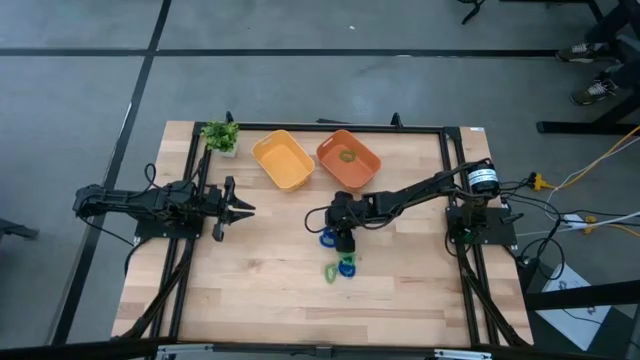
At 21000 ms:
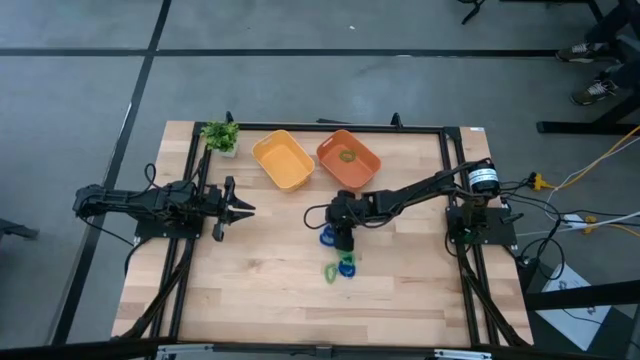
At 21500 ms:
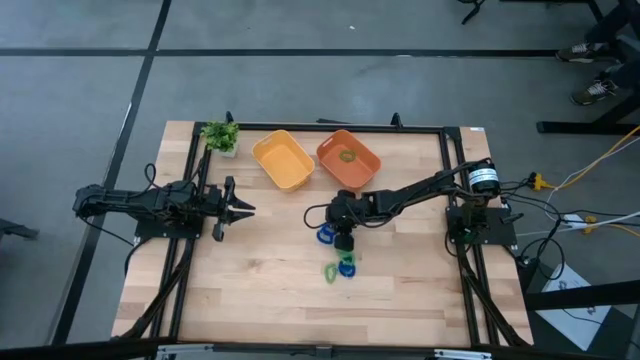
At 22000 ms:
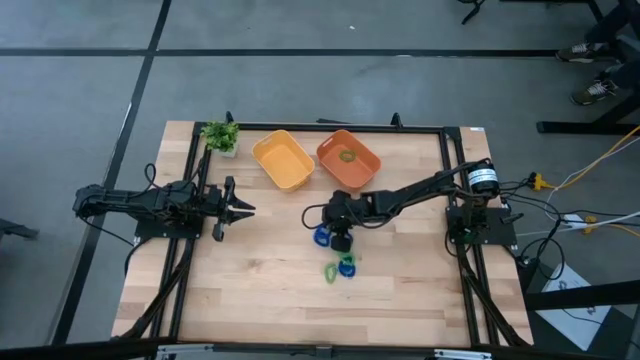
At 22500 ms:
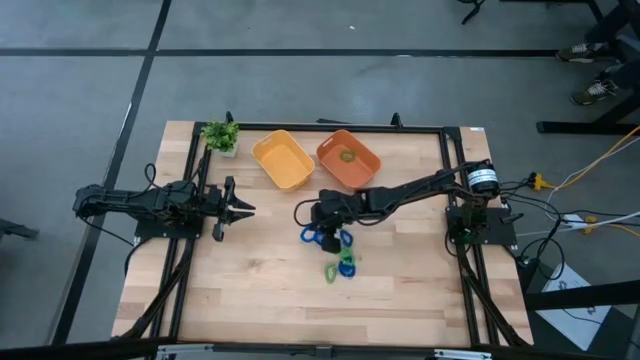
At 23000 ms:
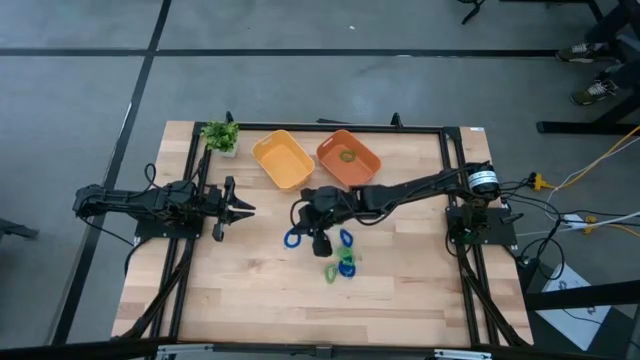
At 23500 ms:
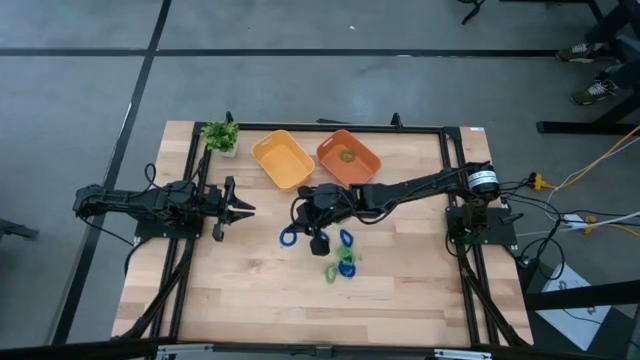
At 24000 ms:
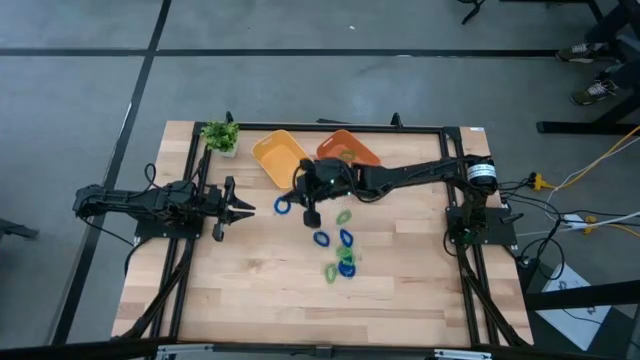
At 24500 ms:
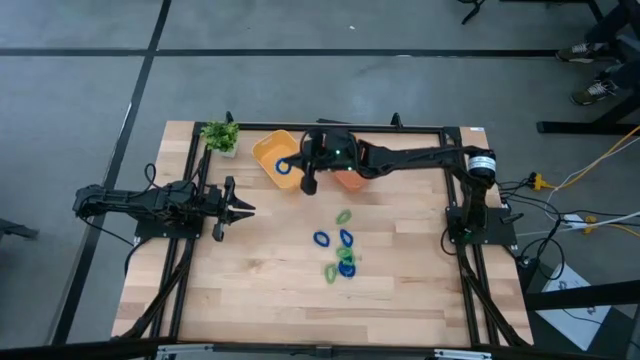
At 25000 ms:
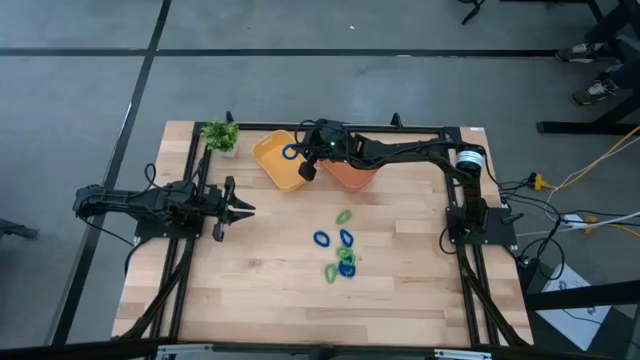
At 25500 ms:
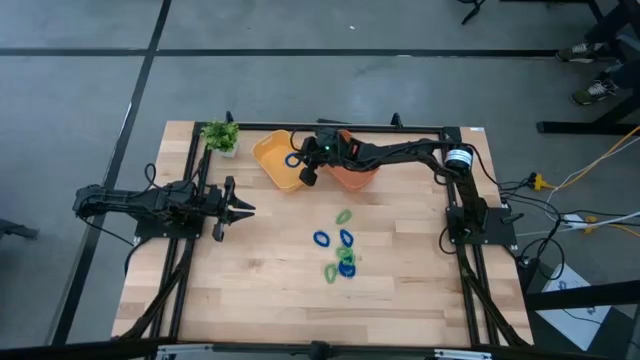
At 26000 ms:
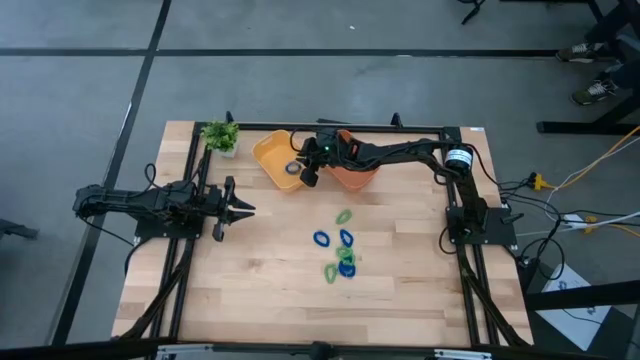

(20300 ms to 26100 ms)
Task: Sort spring keychains
Put the blue spring keychain into the yellow bin

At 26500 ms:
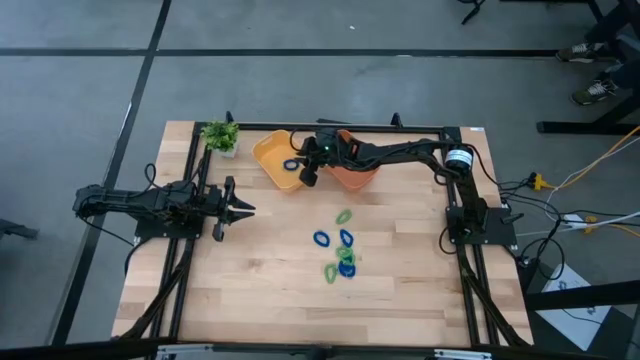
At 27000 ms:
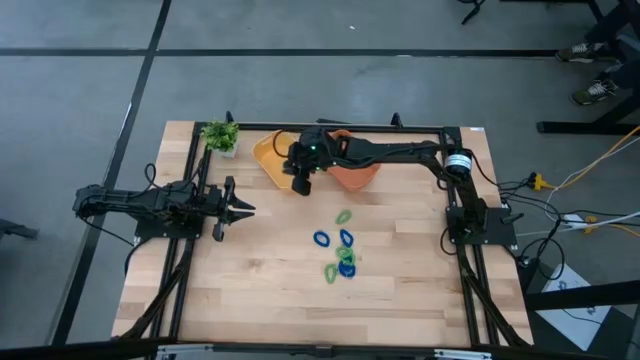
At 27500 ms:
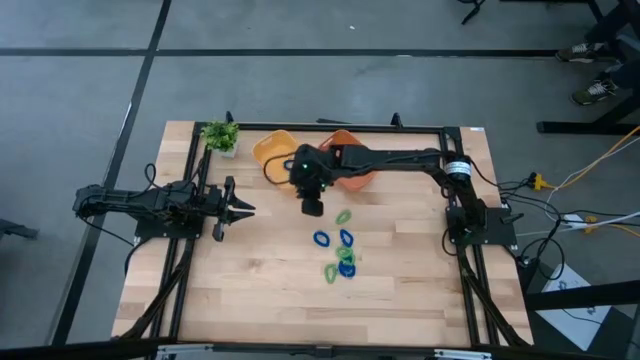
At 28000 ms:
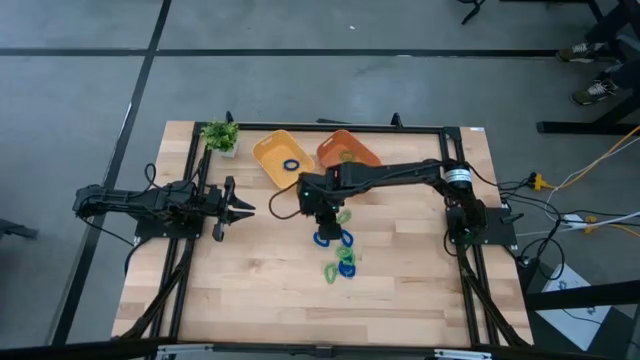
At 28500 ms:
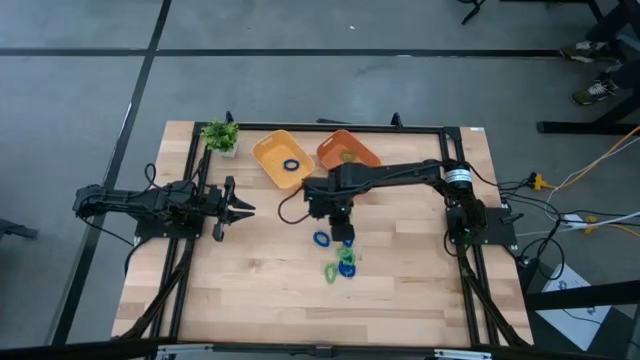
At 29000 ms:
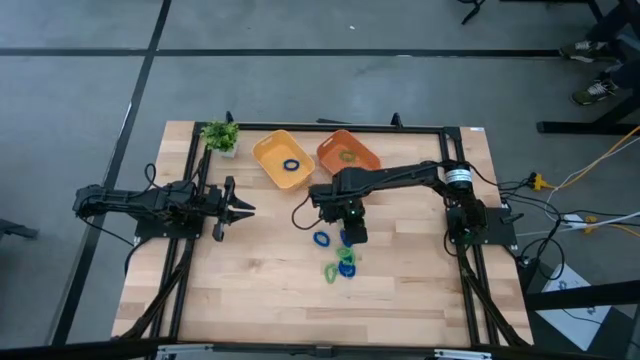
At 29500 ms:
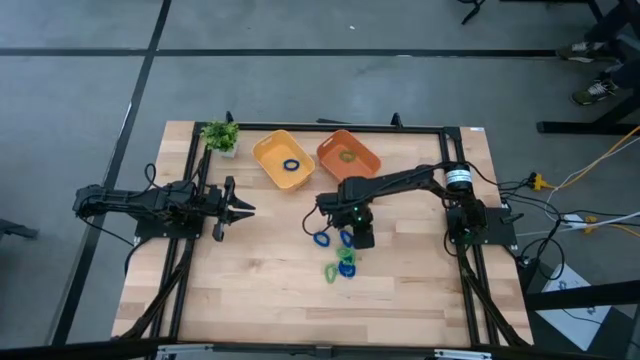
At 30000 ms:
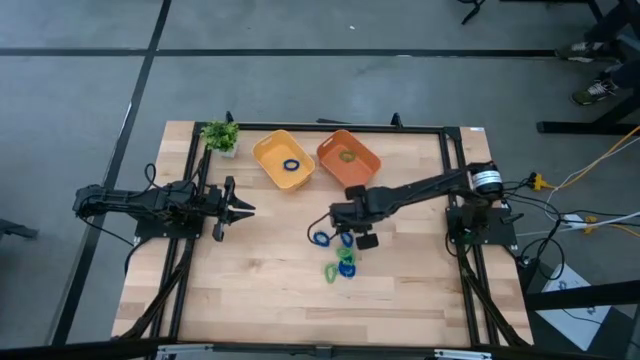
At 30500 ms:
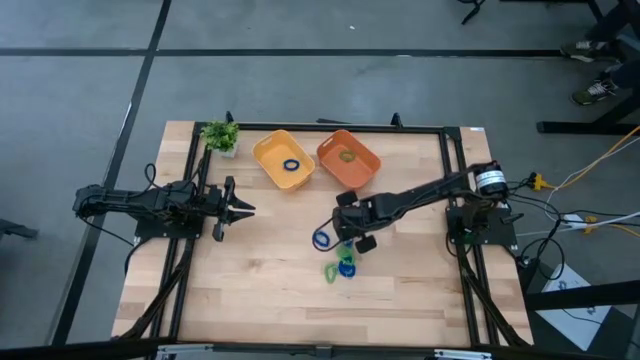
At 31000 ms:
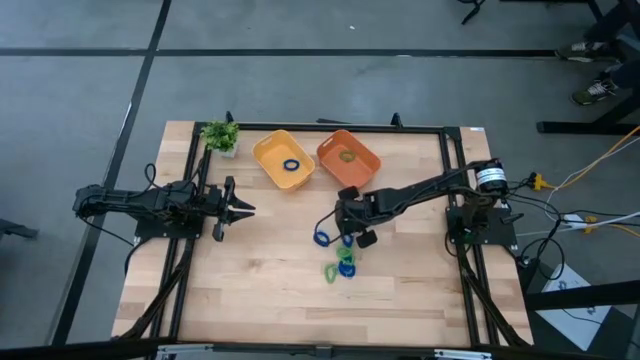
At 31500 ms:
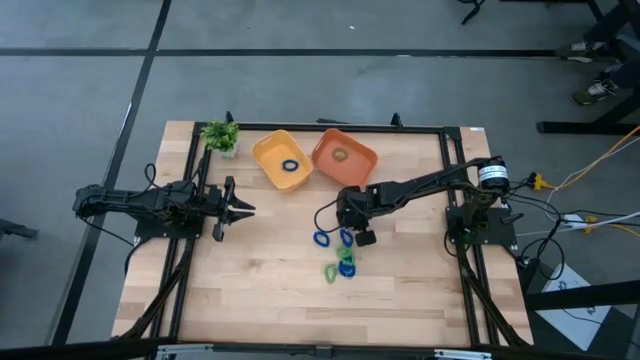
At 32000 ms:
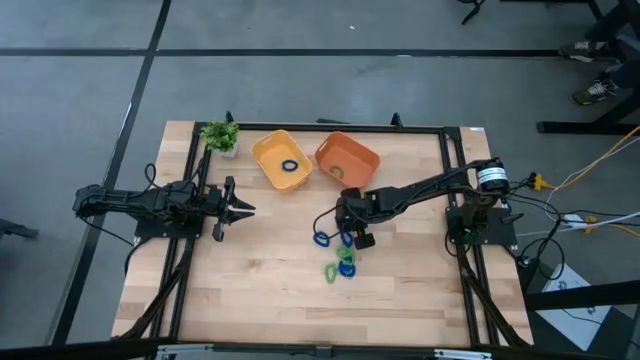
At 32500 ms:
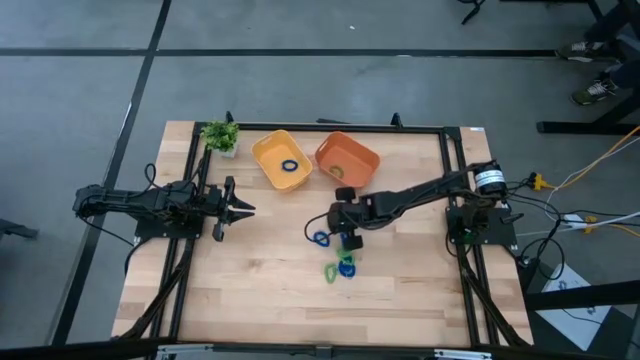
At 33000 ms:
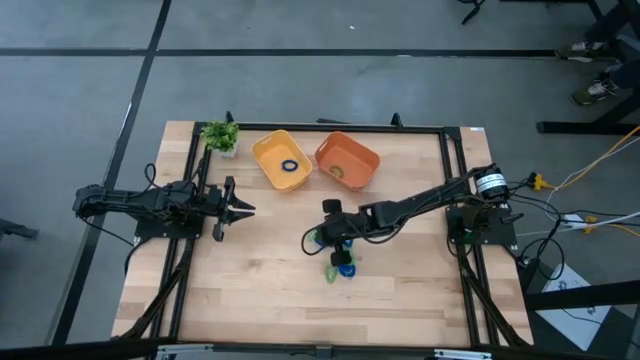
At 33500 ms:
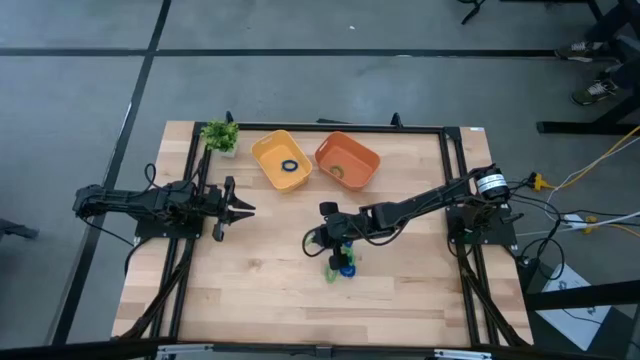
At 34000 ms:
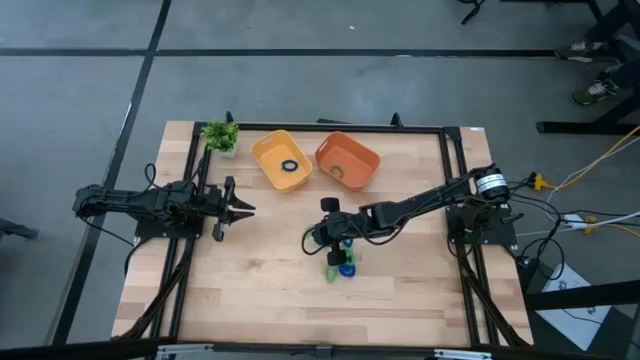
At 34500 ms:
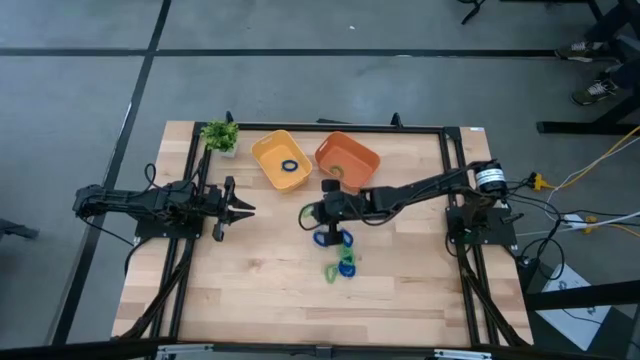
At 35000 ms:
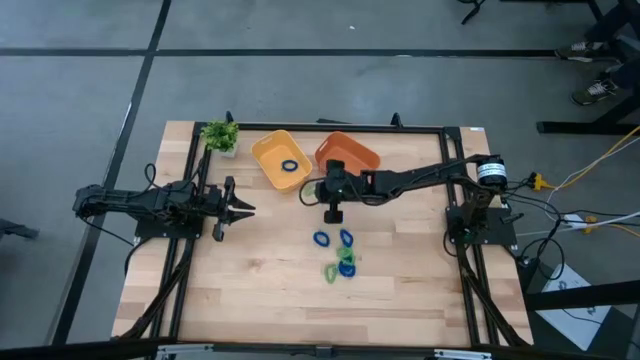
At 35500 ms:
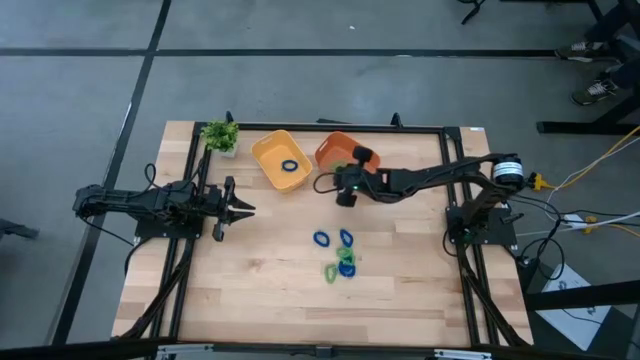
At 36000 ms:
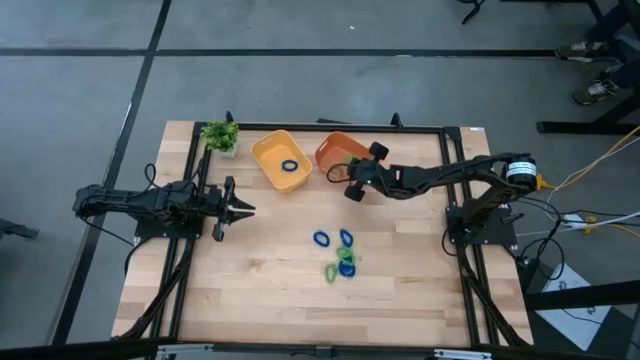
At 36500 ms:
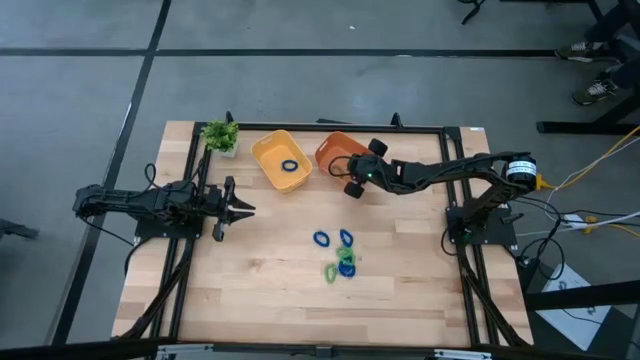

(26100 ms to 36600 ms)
Put the green spring keychain into the orange bin

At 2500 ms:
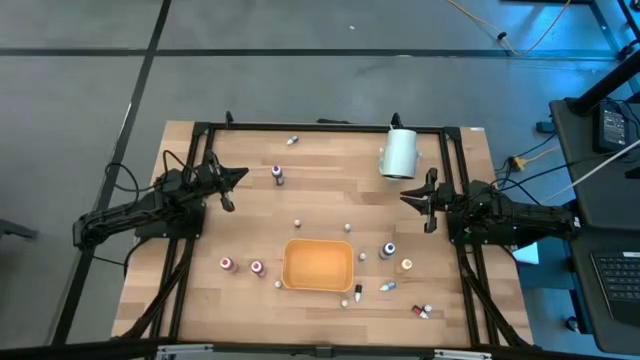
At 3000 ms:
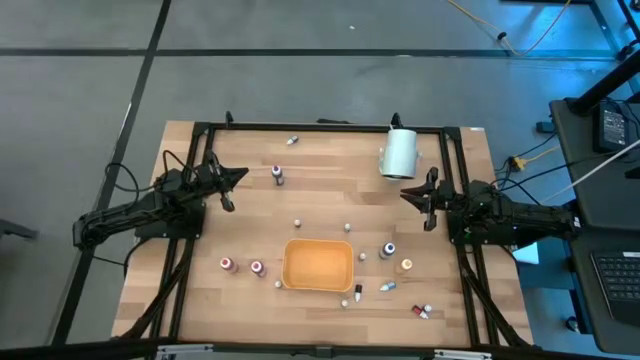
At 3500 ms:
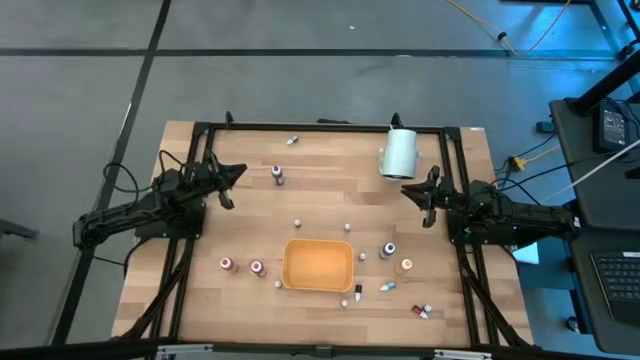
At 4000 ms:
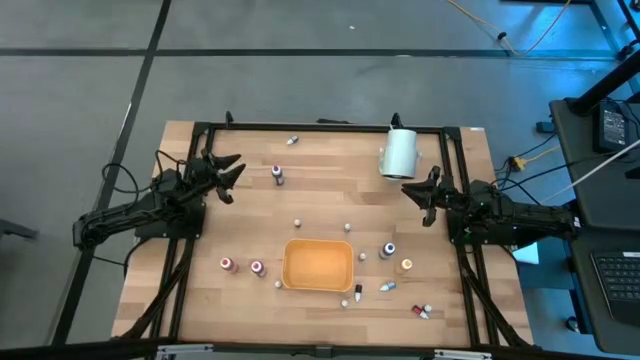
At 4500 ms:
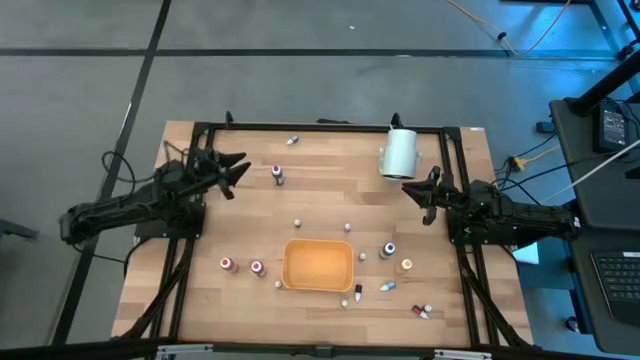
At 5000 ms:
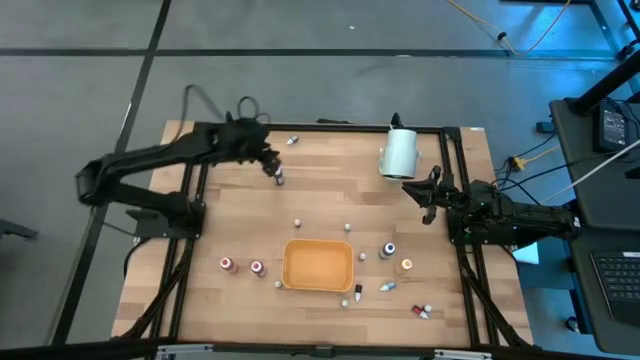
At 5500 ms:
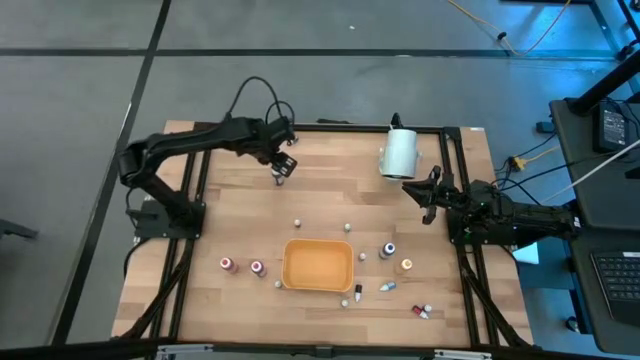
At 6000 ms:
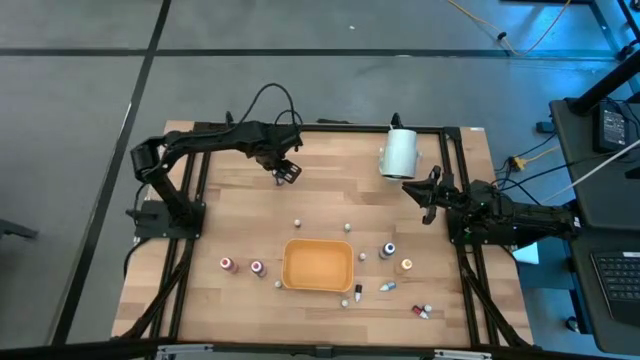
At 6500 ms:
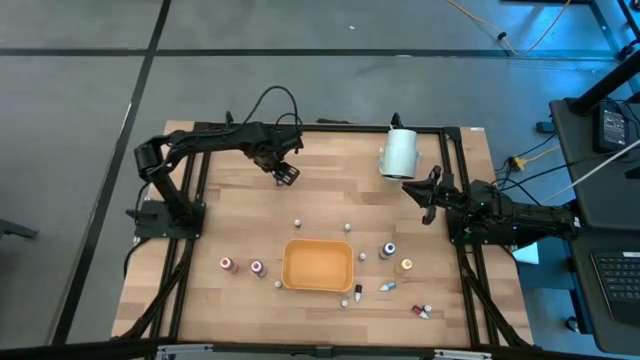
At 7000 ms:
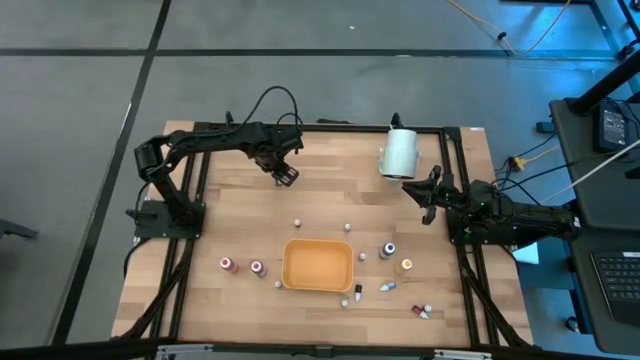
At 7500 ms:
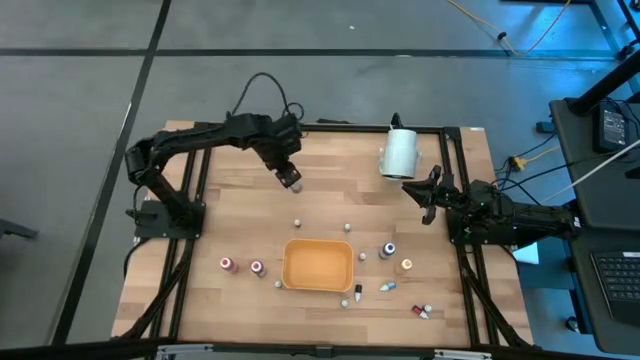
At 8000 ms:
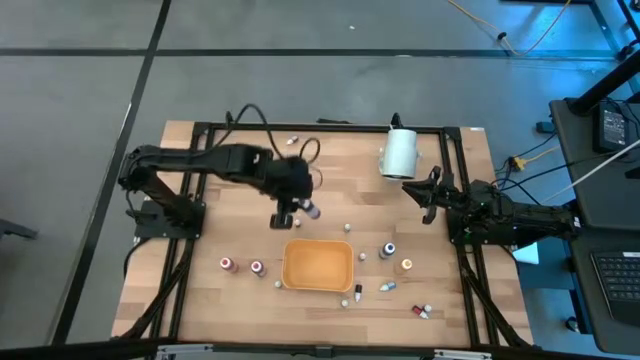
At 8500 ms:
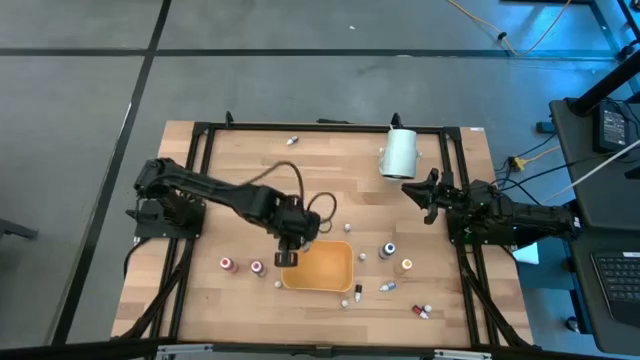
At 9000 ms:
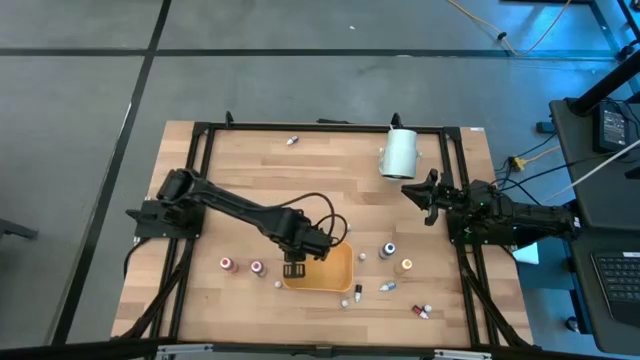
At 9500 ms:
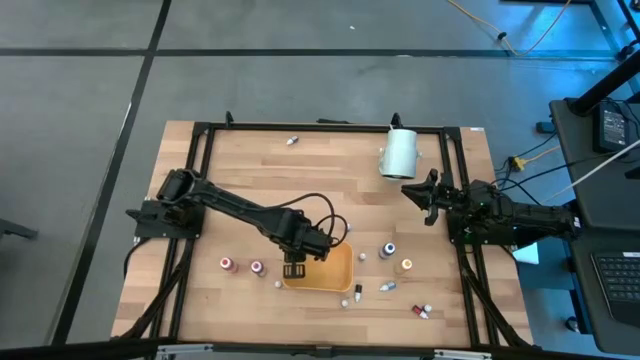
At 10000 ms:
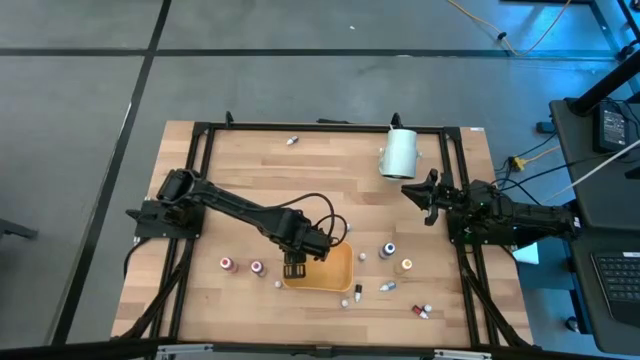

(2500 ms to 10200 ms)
Task: Pick & Place food coloring
Put the large purple food coloring bottle in the yellow bin
